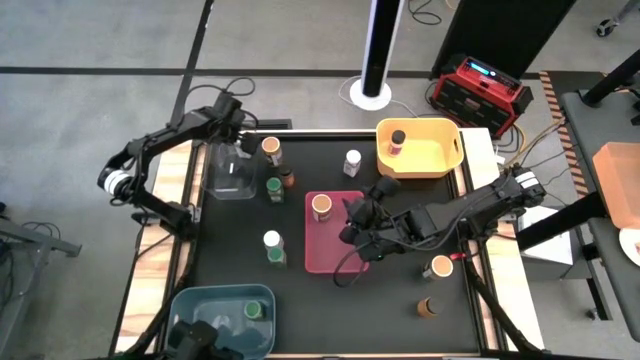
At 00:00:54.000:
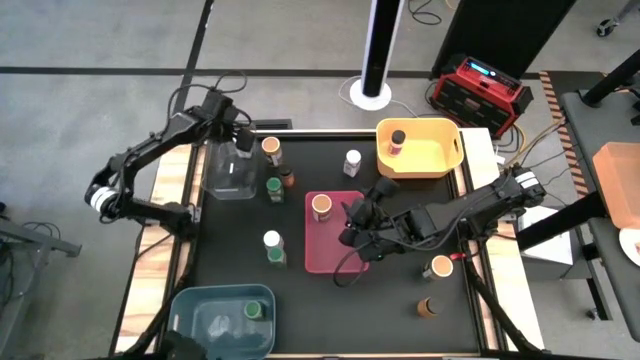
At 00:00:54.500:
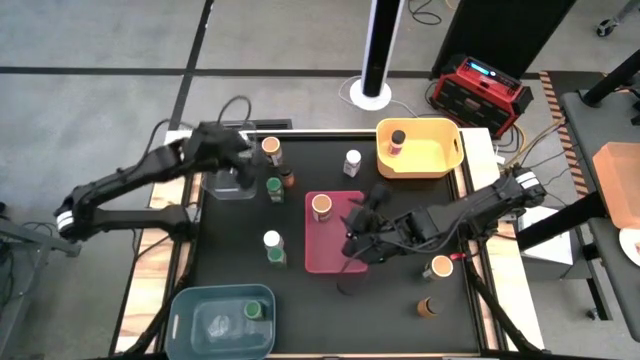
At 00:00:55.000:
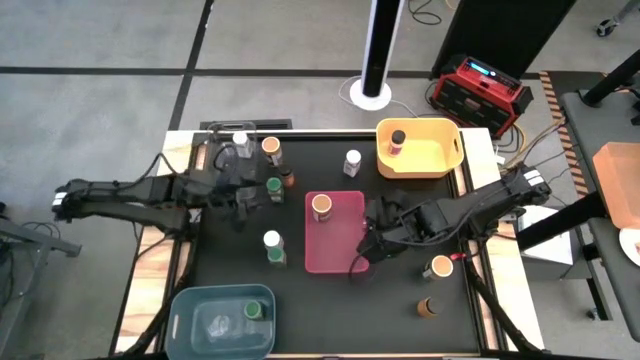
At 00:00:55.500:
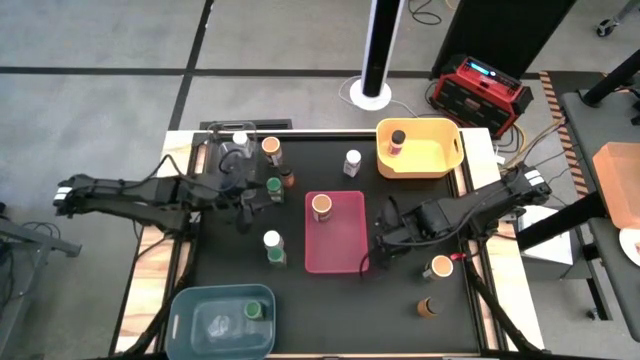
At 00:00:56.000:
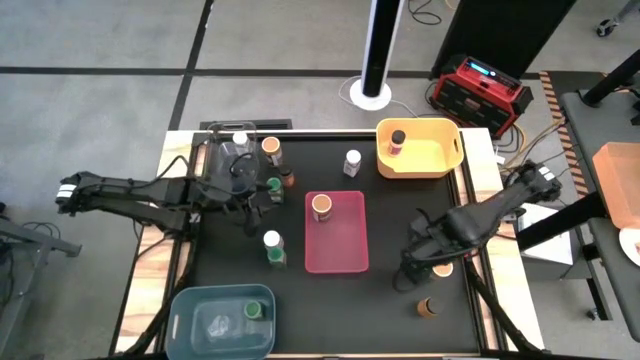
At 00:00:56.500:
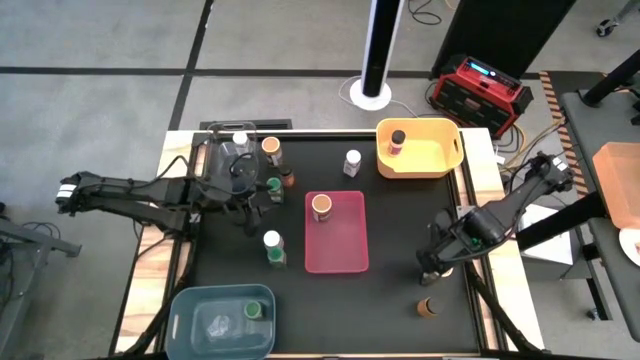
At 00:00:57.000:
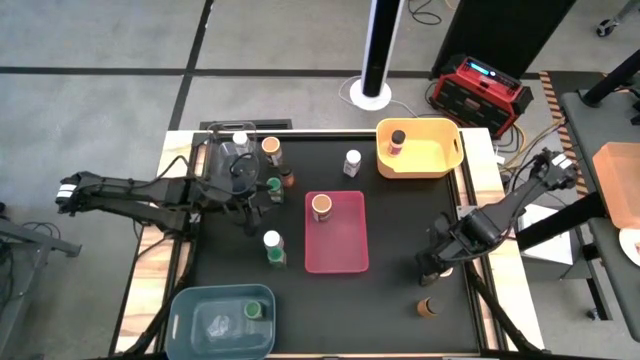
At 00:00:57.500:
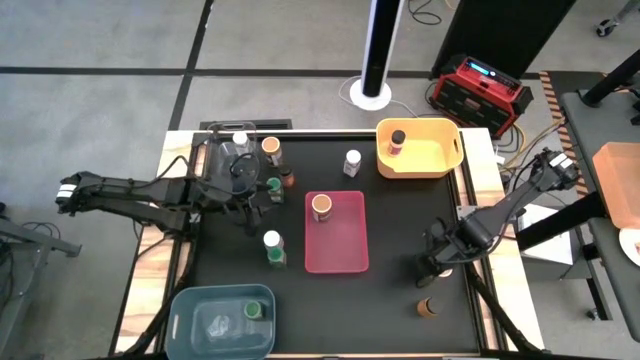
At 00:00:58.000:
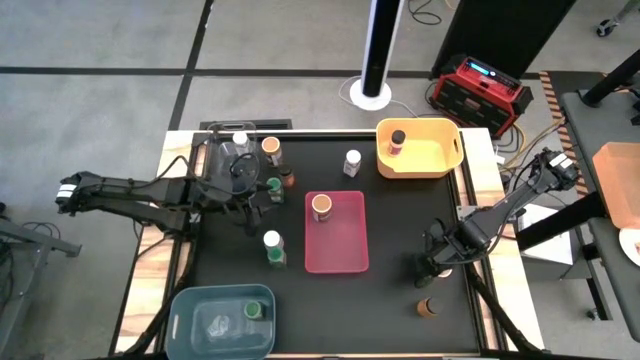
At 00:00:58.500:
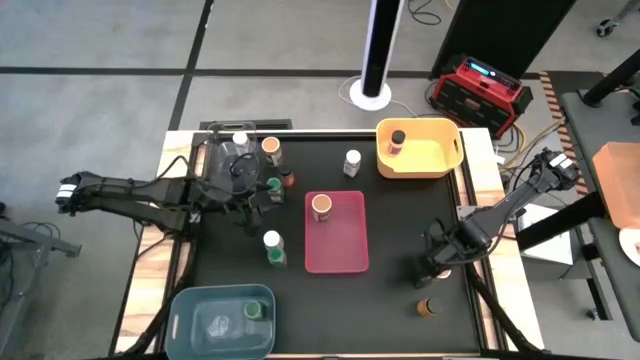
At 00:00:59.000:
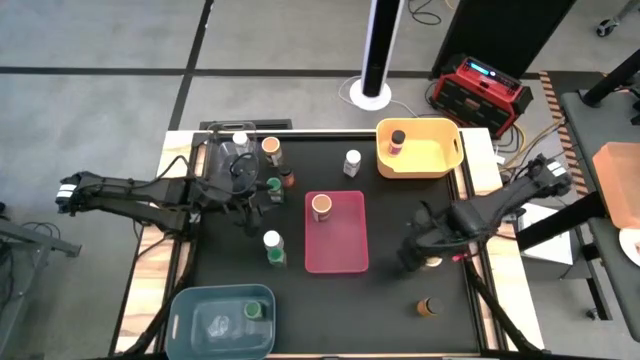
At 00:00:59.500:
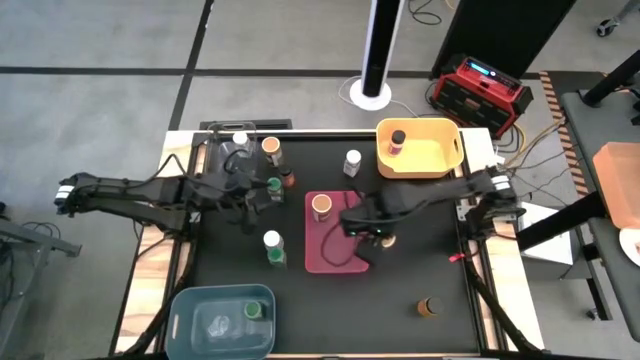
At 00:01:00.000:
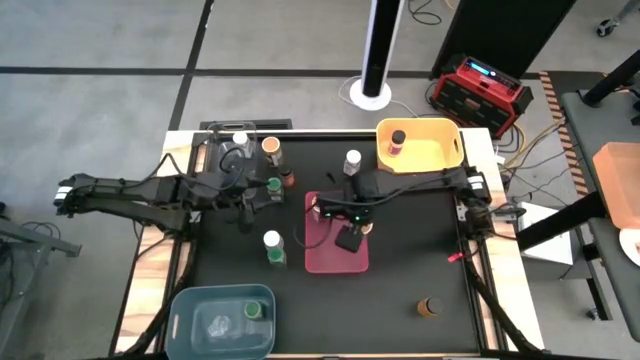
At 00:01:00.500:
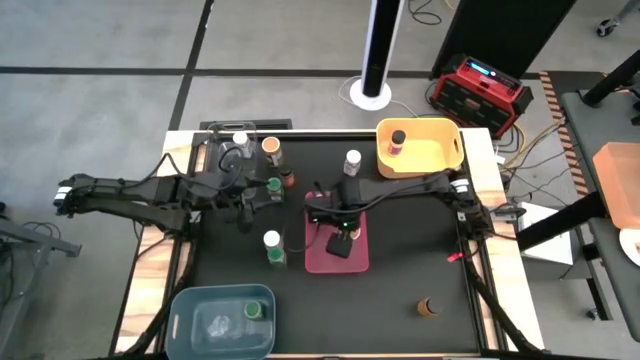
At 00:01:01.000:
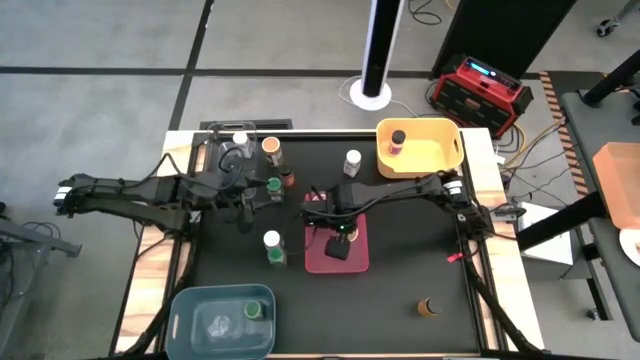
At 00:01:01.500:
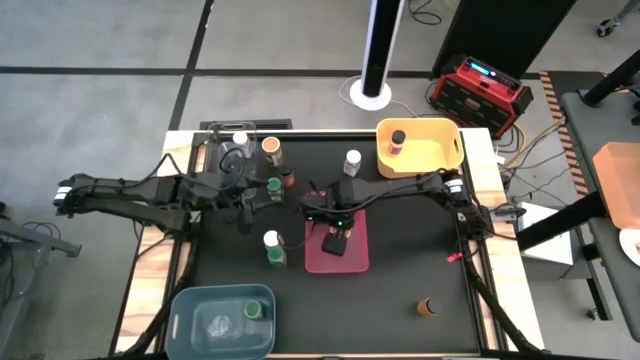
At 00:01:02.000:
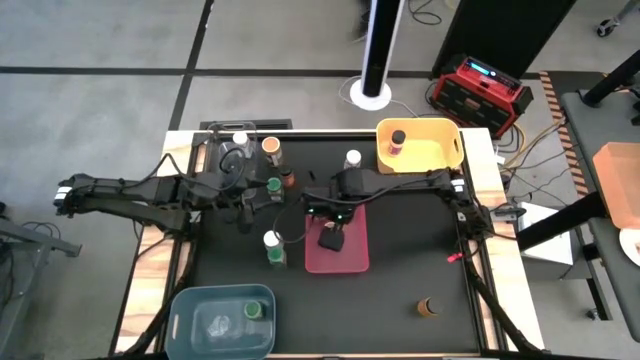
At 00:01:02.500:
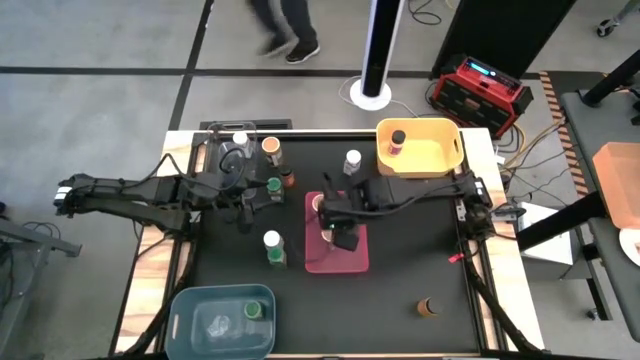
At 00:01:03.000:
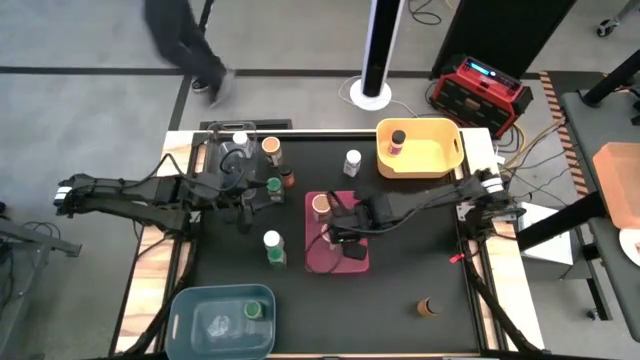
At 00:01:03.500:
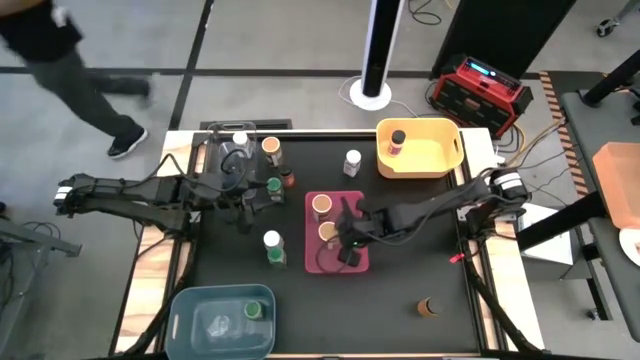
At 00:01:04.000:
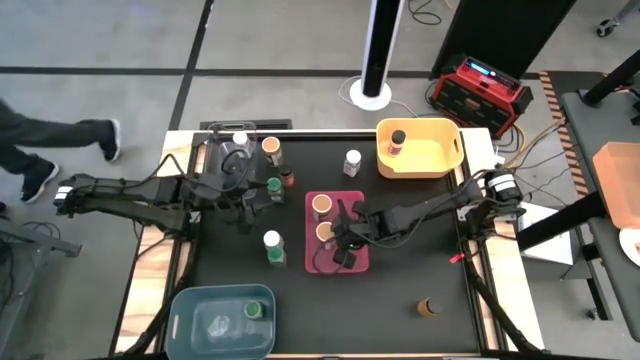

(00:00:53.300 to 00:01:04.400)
Task: Sort spices by type
Put the bottom gold seasoning bottle into the red bin

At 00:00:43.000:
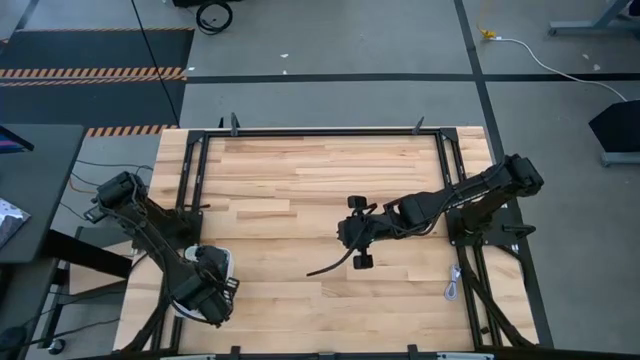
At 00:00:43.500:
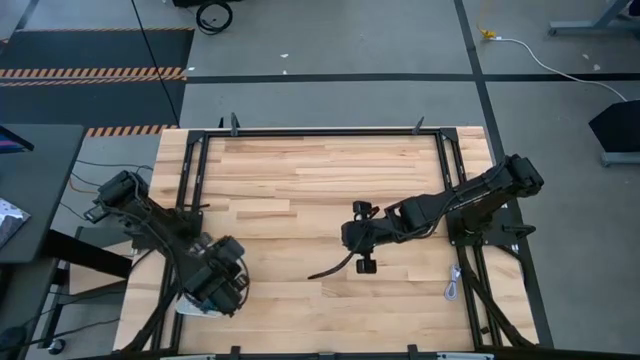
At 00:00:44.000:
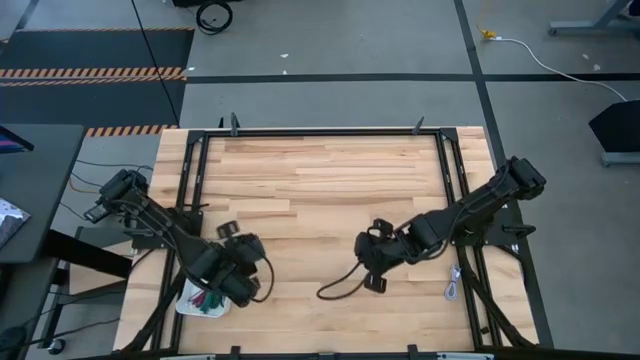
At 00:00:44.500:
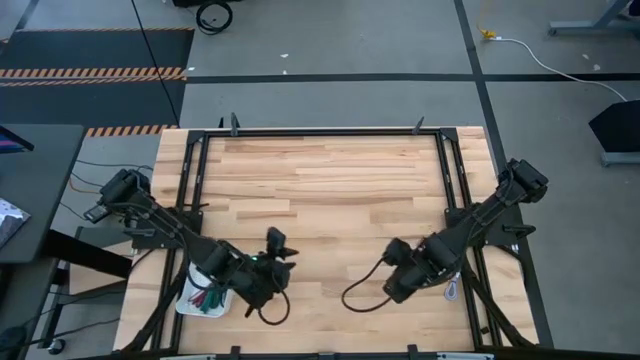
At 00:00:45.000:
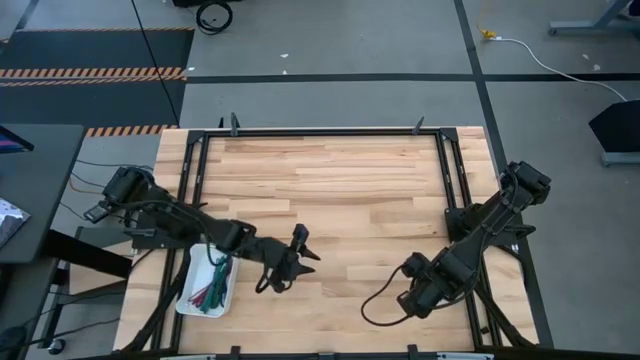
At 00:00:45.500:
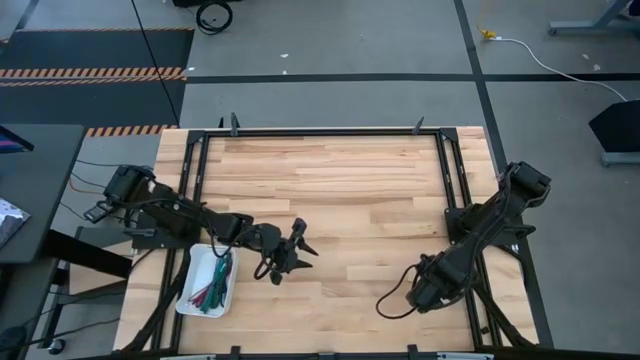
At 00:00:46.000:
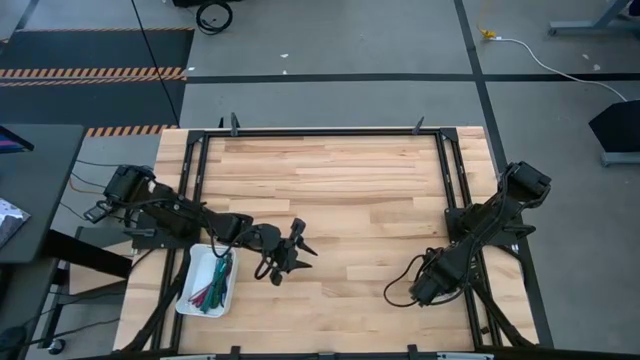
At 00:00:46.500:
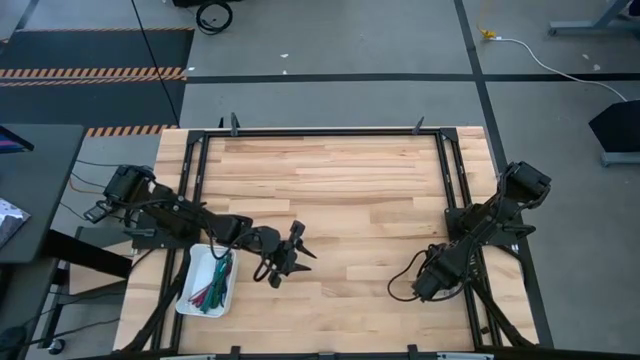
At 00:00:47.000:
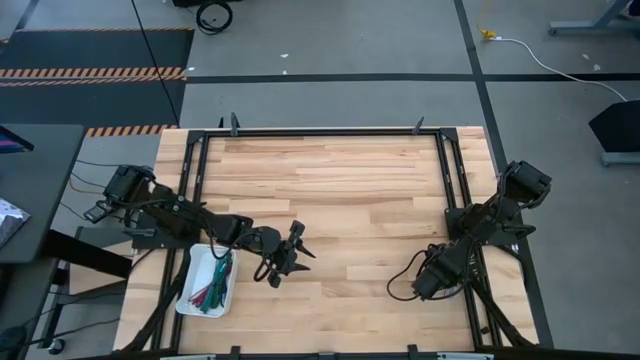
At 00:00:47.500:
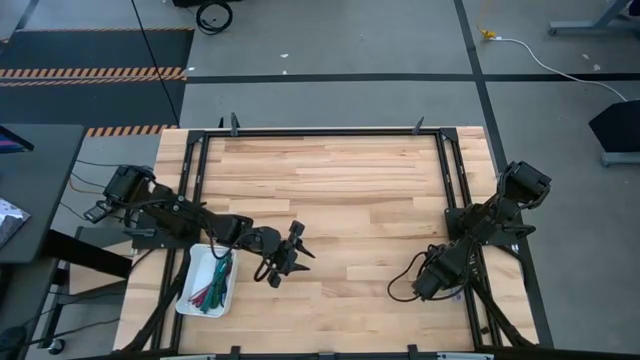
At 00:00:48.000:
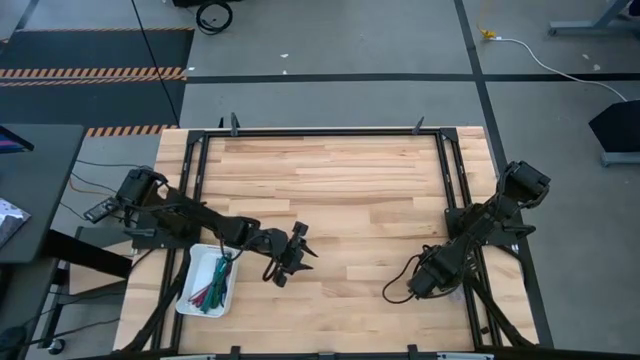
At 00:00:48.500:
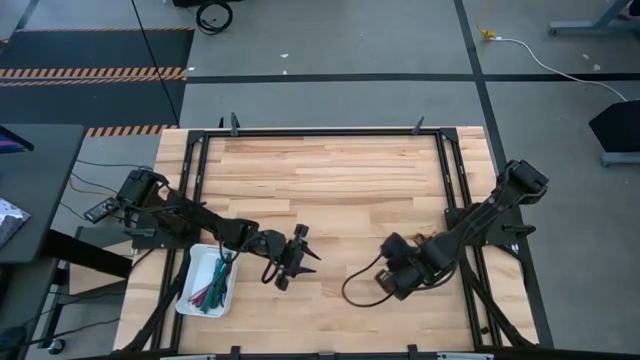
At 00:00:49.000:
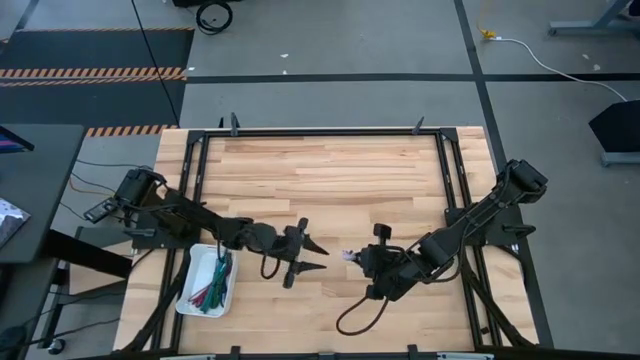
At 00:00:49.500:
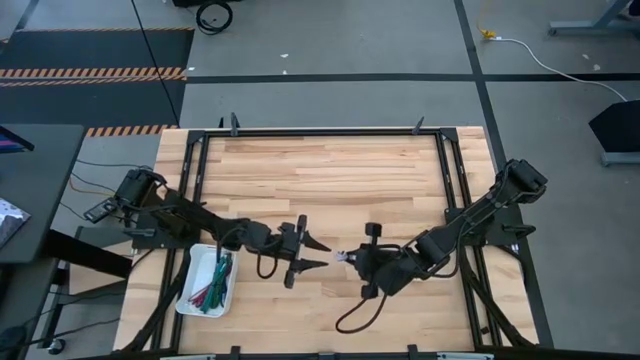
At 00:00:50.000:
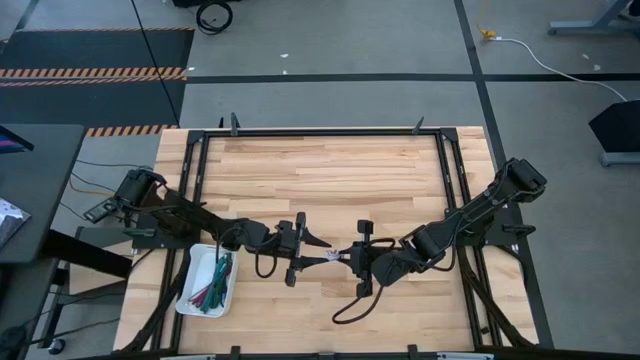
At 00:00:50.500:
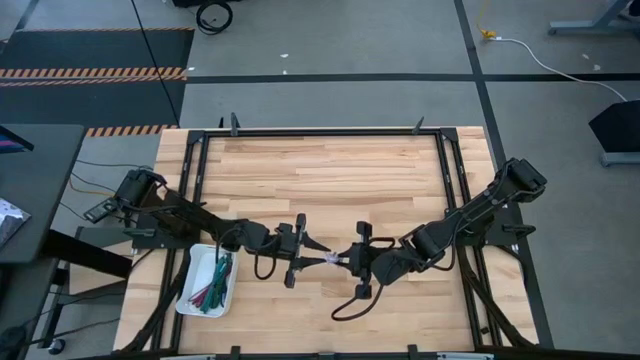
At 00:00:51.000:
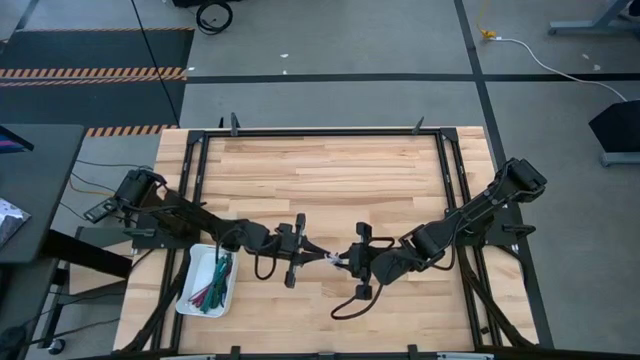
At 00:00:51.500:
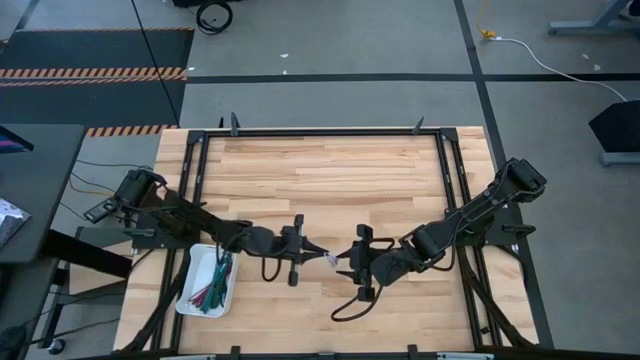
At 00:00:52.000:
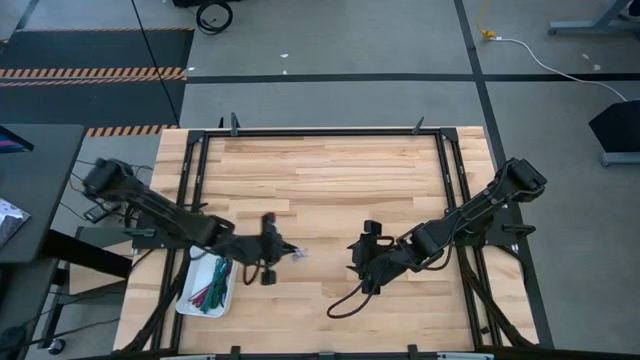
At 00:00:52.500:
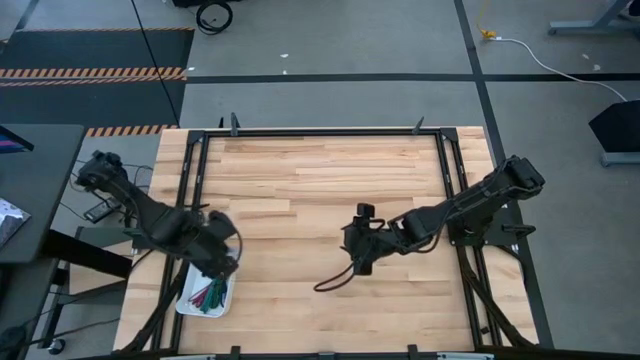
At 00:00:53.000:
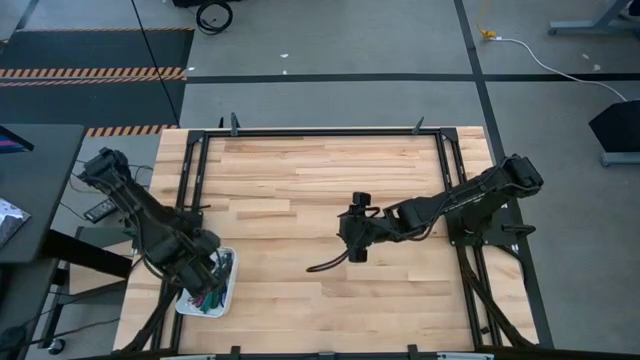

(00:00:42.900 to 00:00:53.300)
Task: Pick and place USB-C Cables
Put the white charger cable into the white bin
